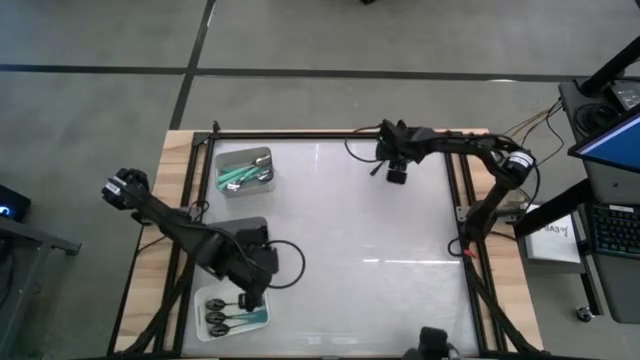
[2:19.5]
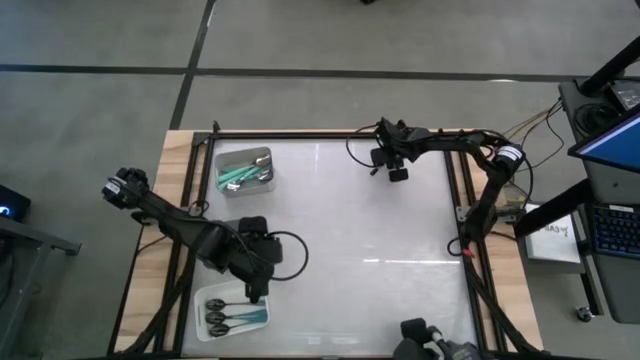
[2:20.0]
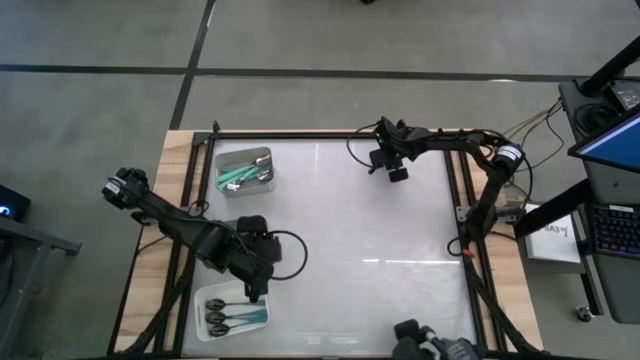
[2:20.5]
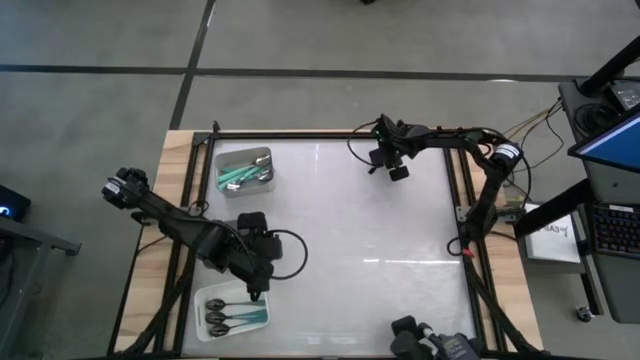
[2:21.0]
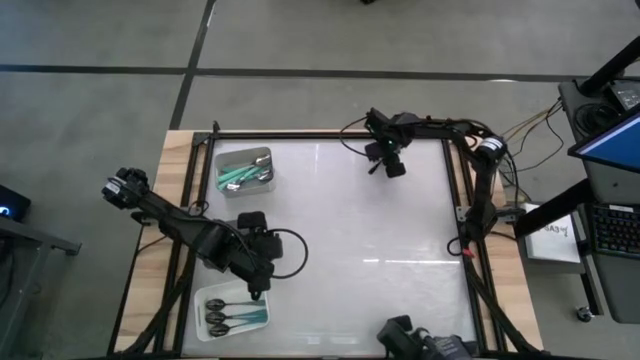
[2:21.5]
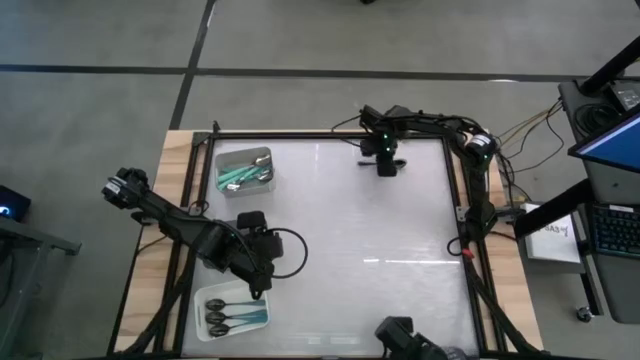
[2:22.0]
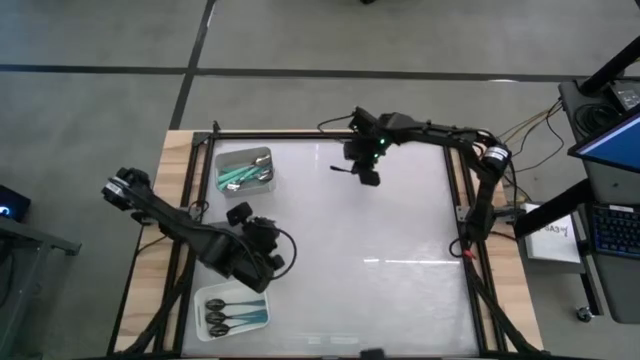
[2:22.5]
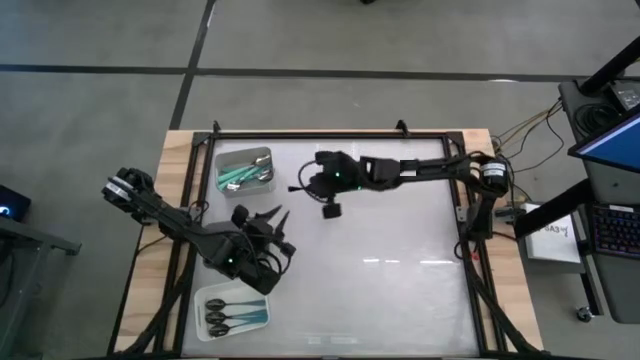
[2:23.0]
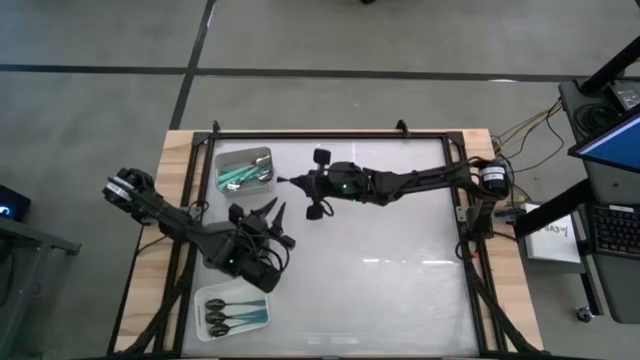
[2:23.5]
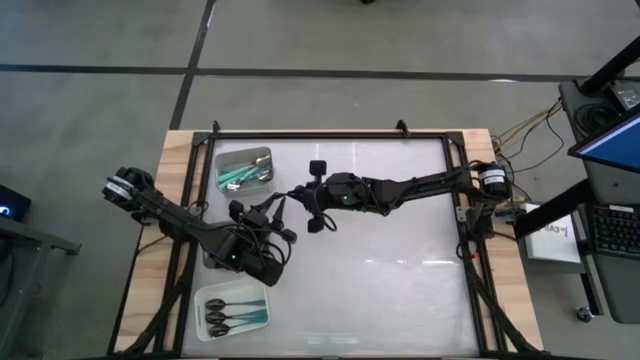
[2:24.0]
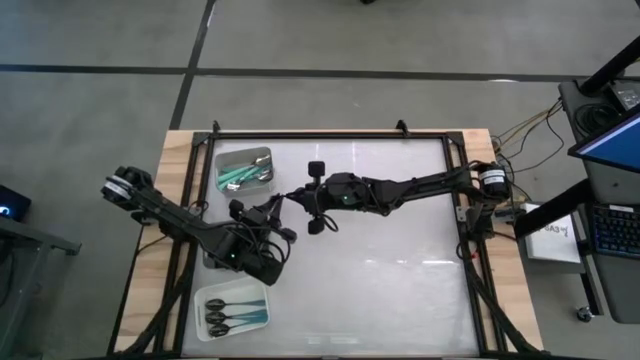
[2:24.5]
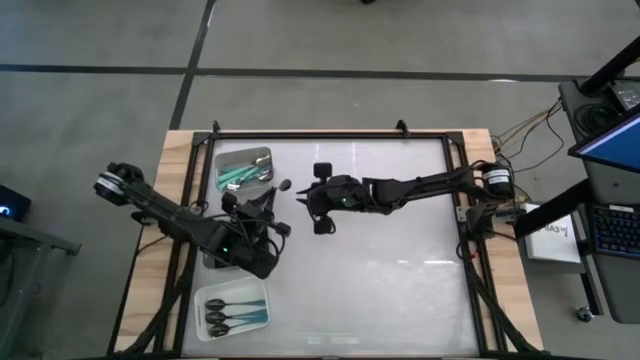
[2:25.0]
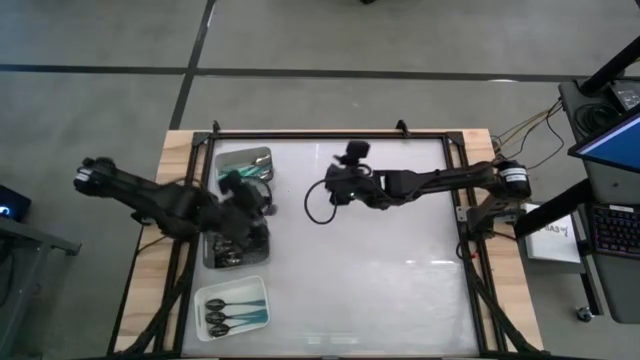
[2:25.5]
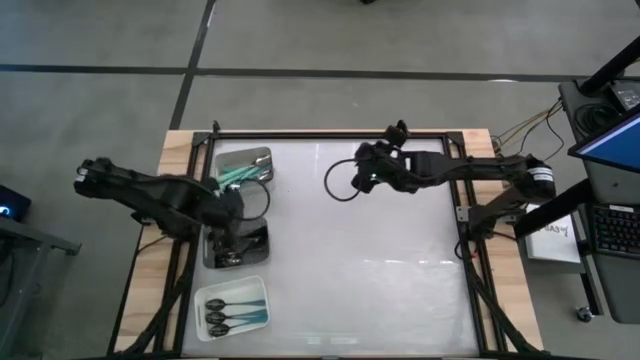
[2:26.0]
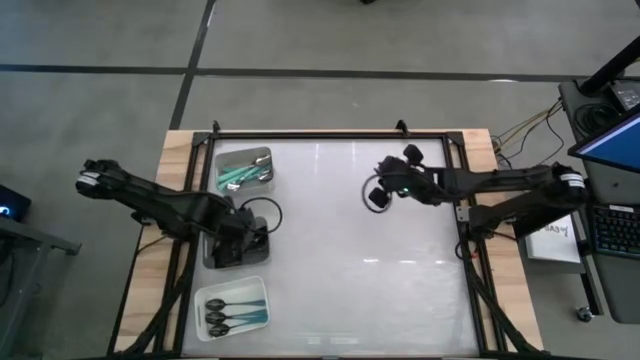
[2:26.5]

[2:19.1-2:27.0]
Task: Sort silverware by color (type)
Put the black spoon into the black bin

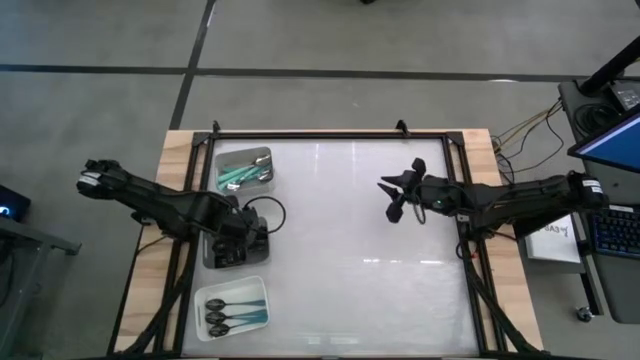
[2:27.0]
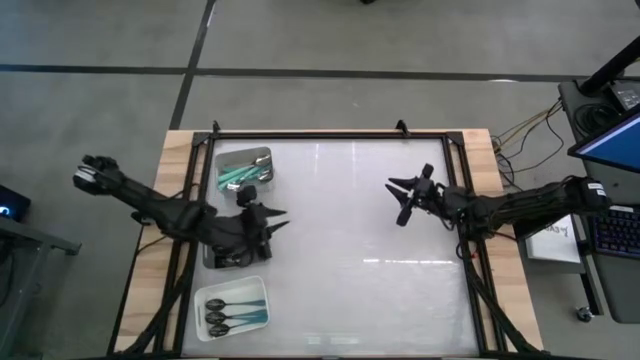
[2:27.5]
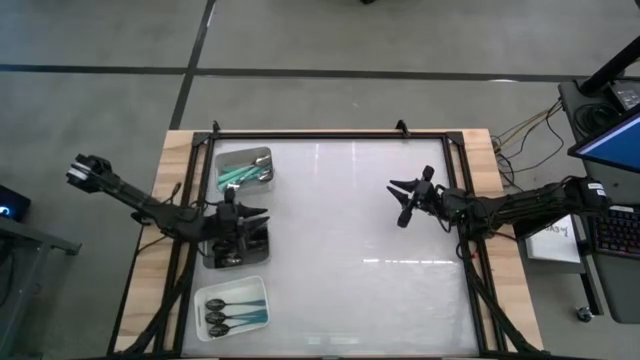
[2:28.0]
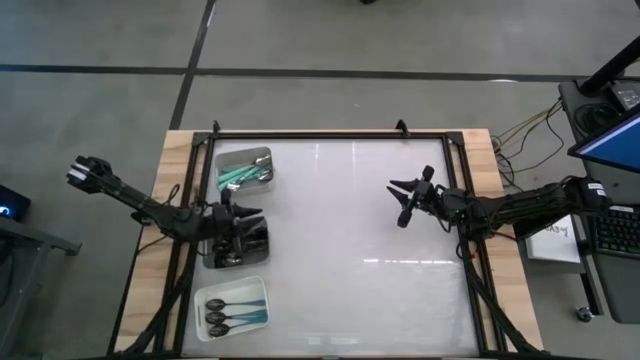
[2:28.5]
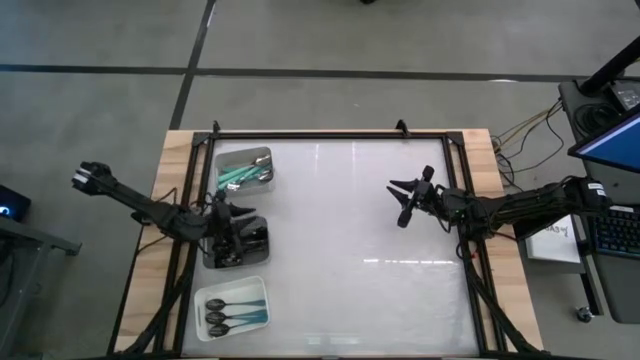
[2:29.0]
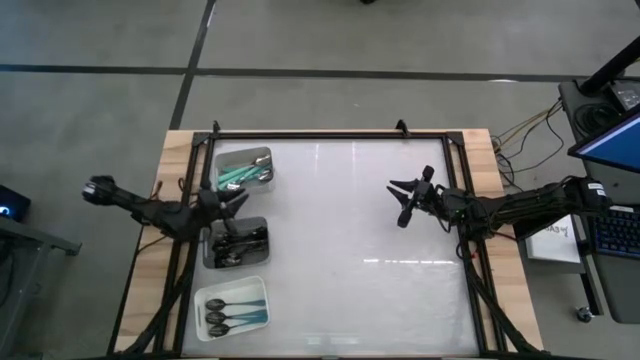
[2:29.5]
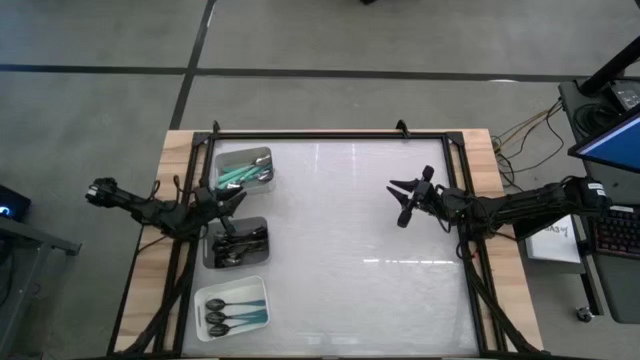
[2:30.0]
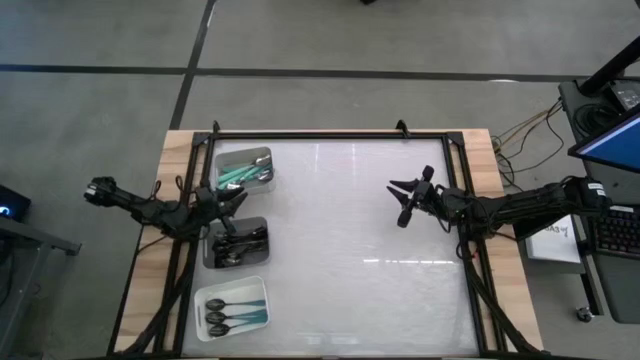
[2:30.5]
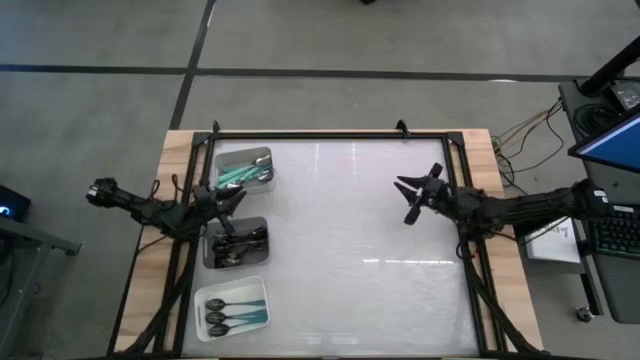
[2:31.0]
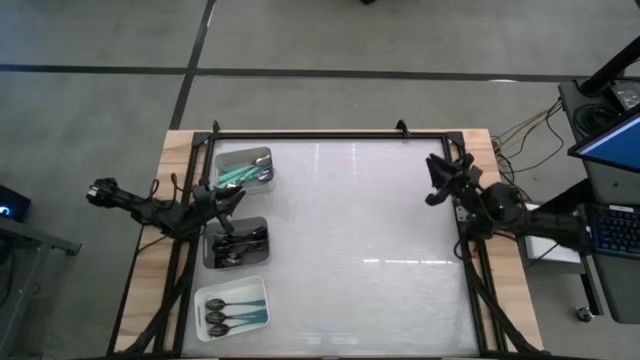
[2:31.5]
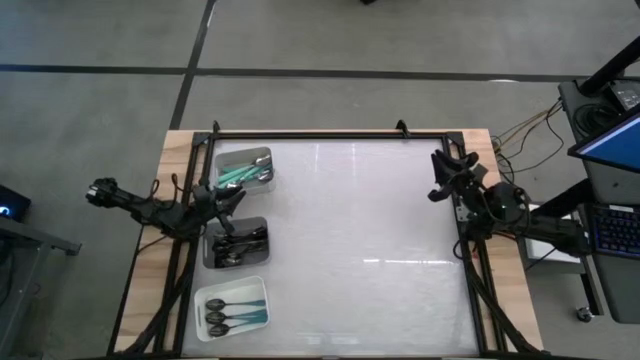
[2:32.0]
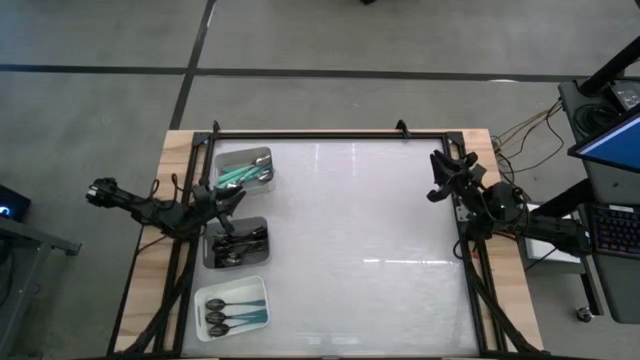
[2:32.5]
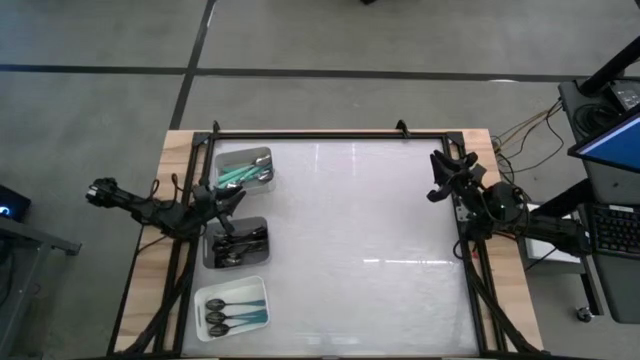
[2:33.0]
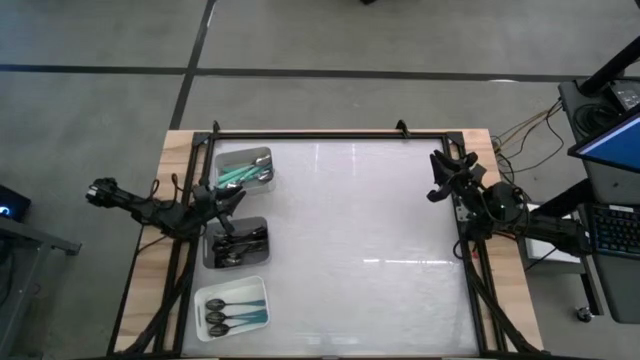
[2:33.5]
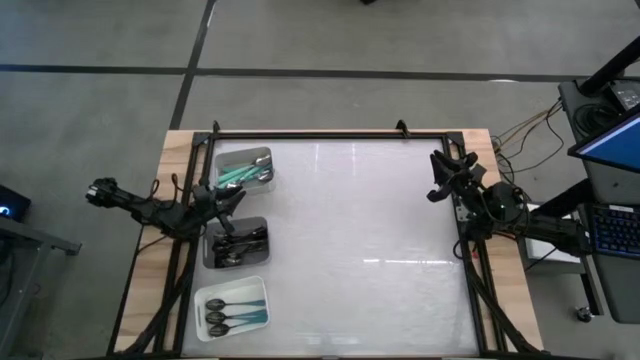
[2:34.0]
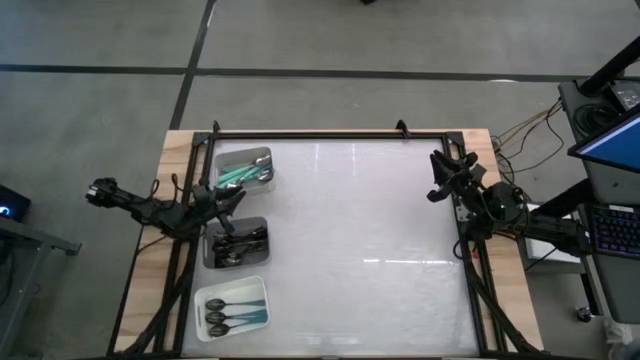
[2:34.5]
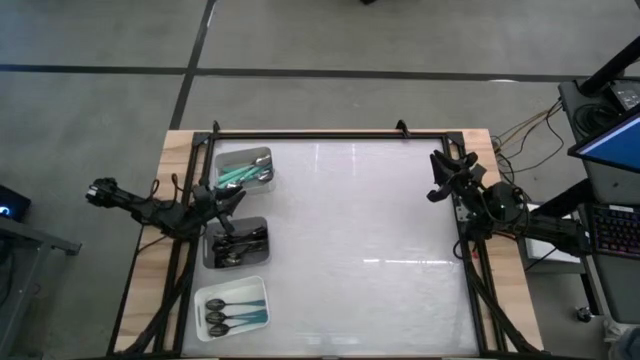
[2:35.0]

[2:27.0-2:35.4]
Return to Home Position

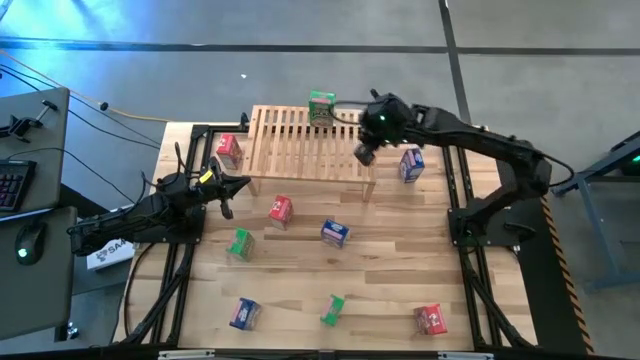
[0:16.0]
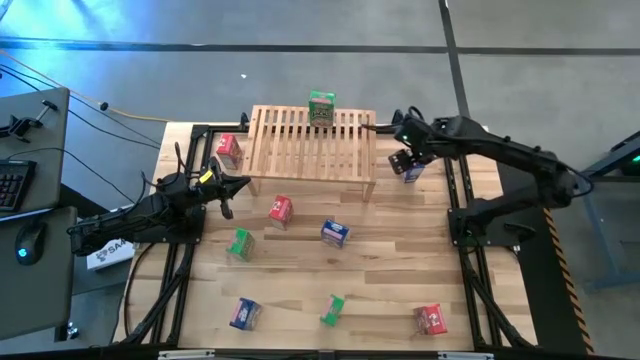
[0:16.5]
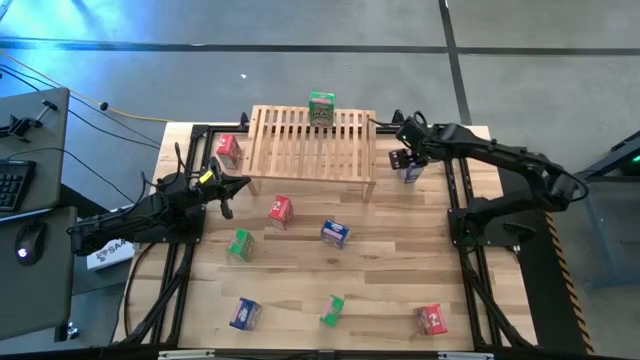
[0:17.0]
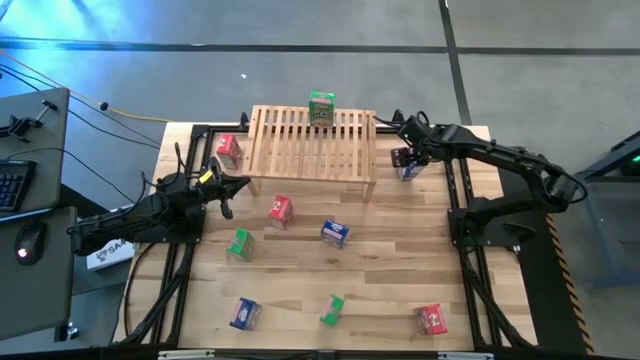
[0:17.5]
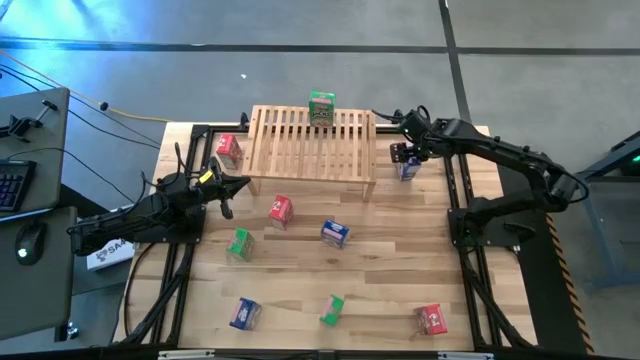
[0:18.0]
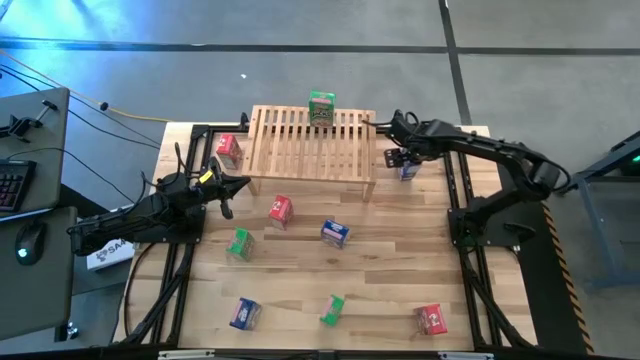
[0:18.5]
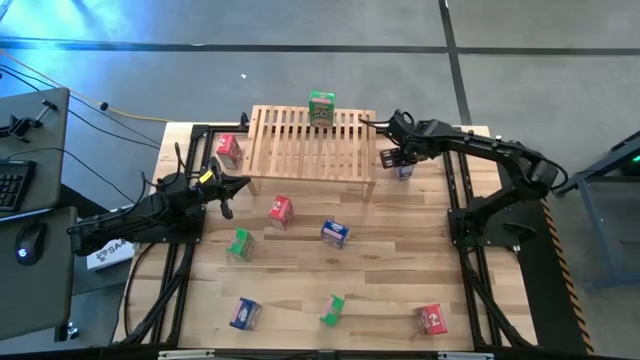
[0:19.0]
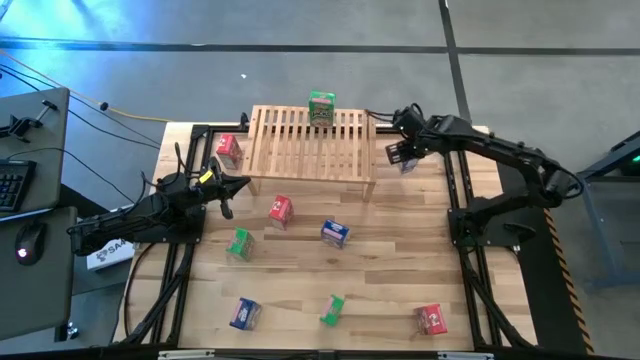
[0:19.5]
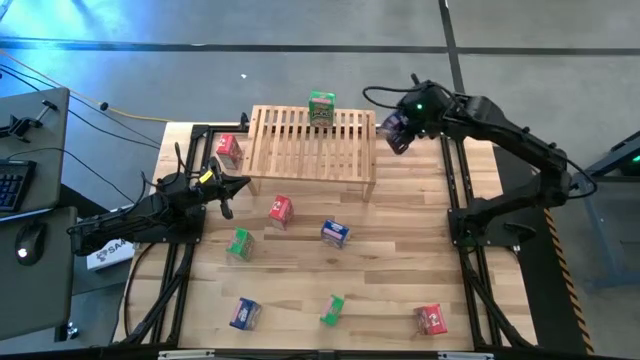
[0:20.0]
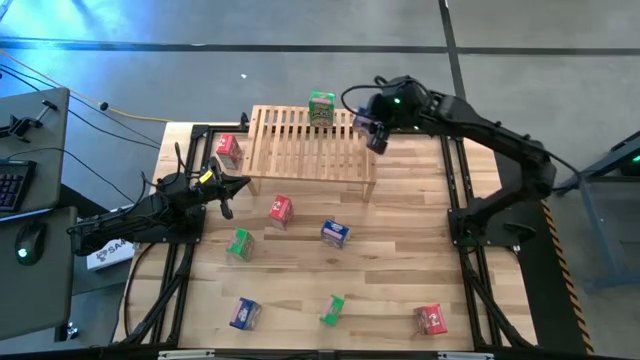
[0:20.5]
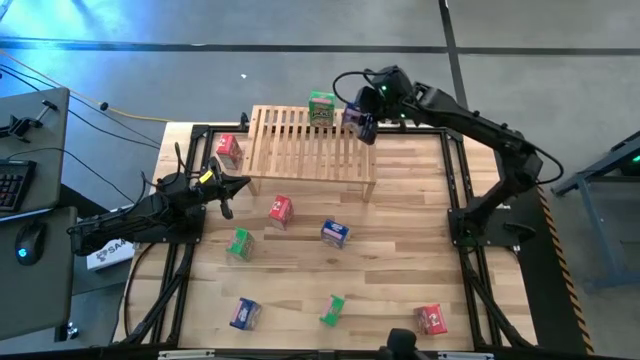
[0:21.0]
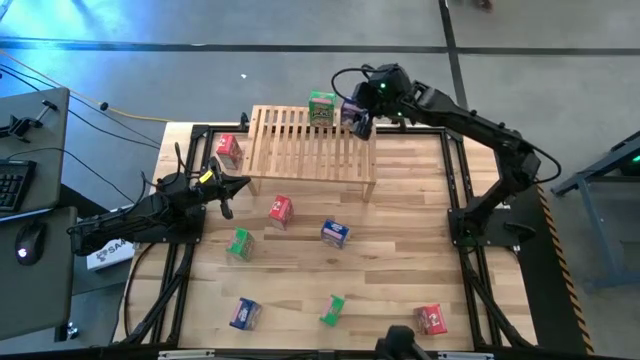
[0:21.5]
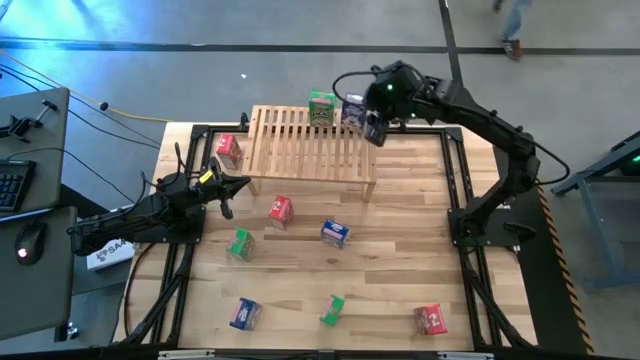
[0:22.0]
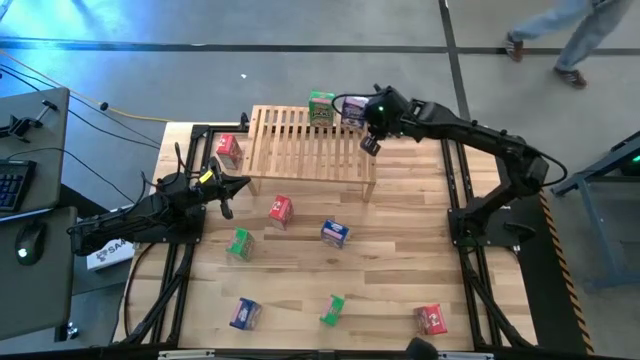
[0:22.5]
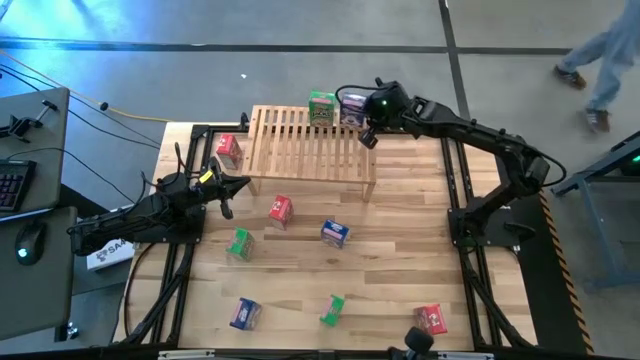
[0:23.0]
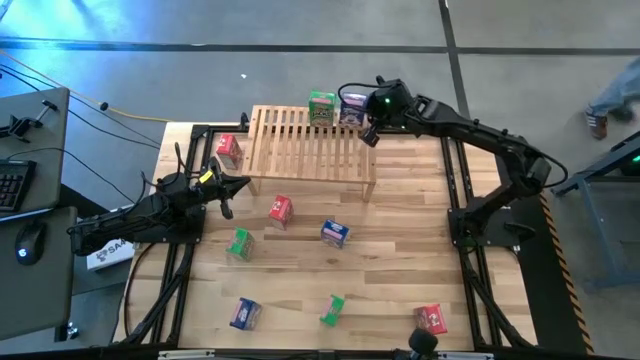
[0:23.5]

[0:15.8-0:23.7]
Task: Stack cereal on shelf
Put the top right blue cereal box on the shelf
